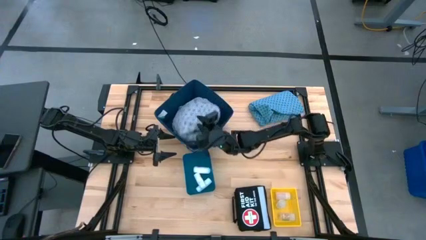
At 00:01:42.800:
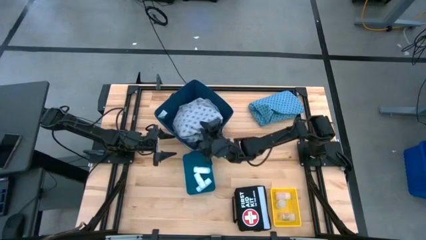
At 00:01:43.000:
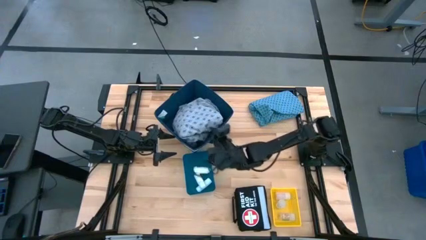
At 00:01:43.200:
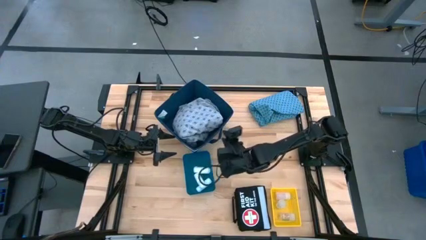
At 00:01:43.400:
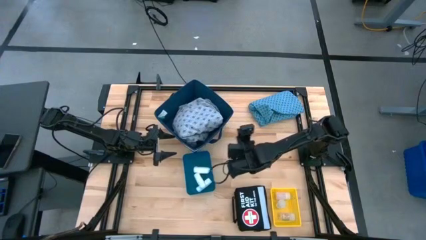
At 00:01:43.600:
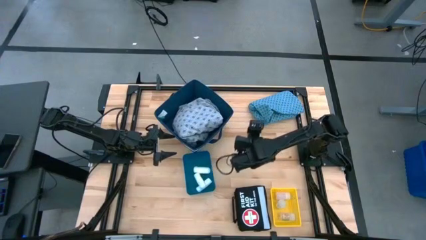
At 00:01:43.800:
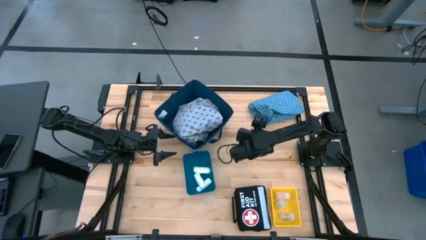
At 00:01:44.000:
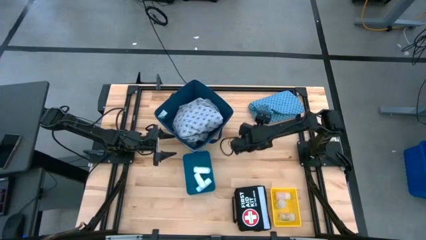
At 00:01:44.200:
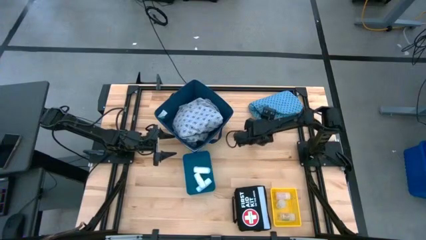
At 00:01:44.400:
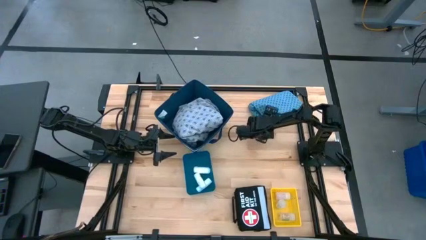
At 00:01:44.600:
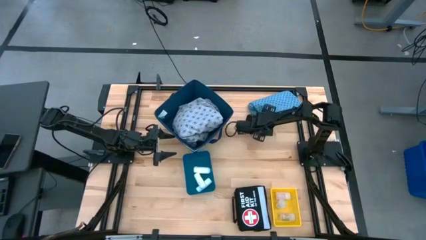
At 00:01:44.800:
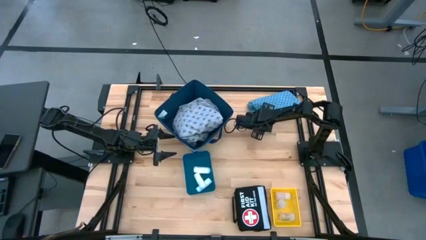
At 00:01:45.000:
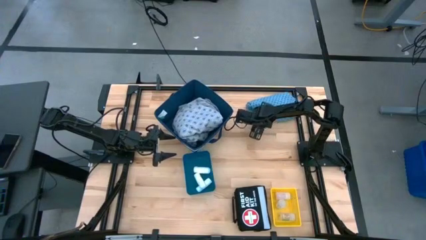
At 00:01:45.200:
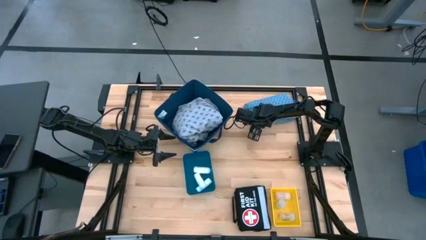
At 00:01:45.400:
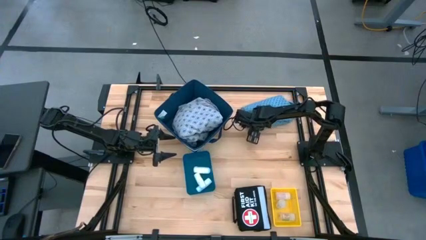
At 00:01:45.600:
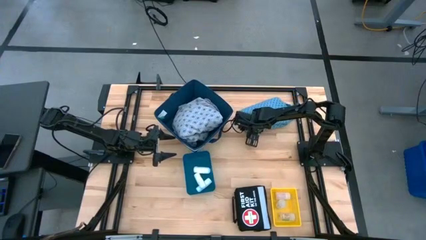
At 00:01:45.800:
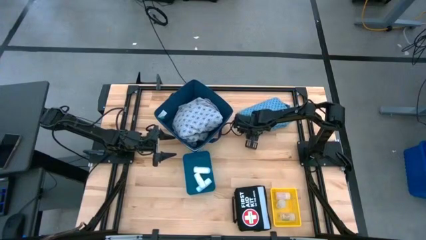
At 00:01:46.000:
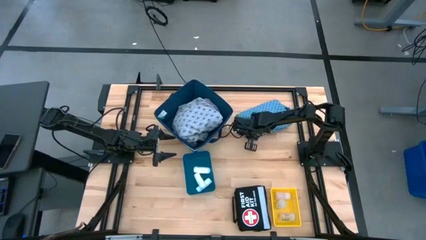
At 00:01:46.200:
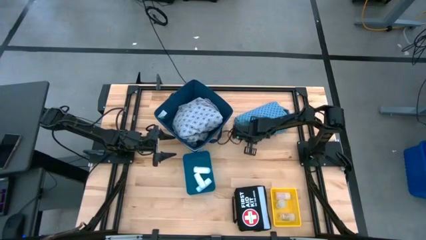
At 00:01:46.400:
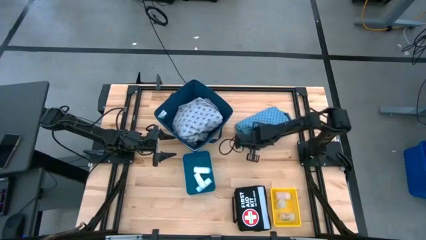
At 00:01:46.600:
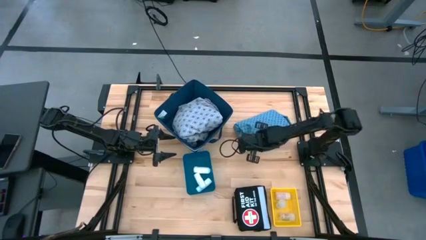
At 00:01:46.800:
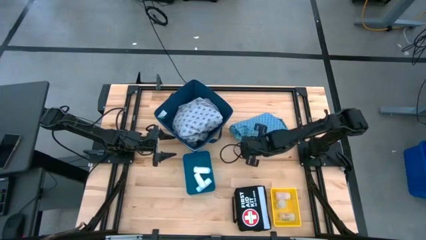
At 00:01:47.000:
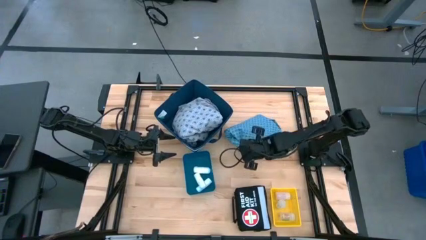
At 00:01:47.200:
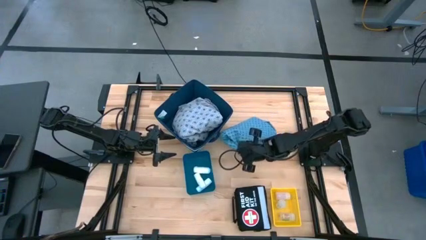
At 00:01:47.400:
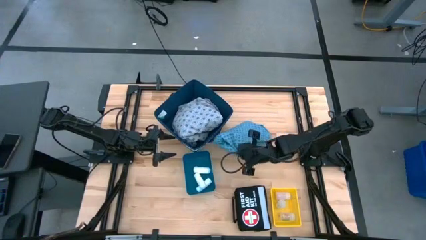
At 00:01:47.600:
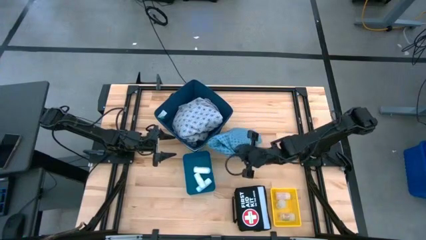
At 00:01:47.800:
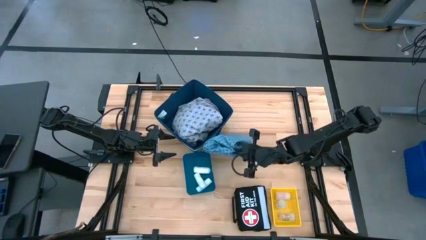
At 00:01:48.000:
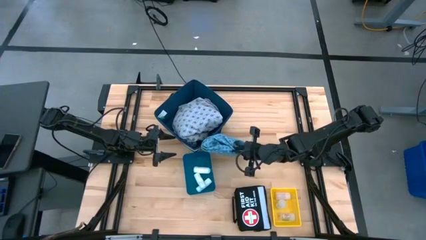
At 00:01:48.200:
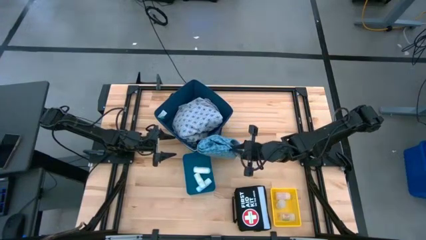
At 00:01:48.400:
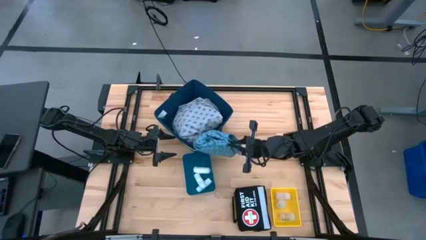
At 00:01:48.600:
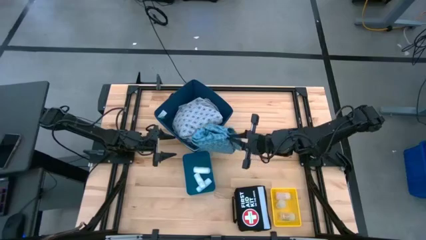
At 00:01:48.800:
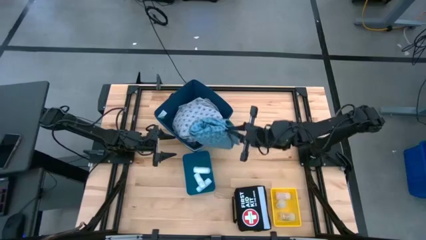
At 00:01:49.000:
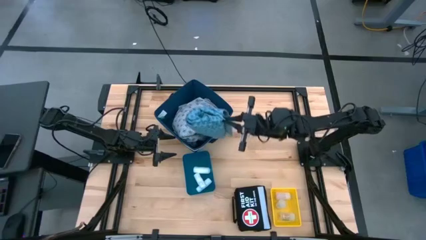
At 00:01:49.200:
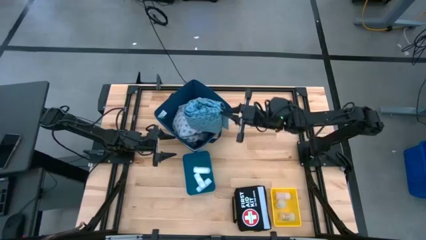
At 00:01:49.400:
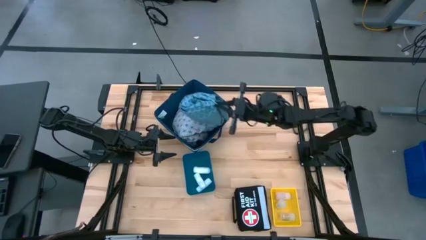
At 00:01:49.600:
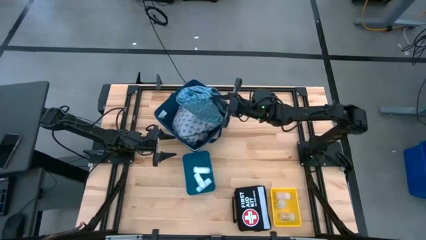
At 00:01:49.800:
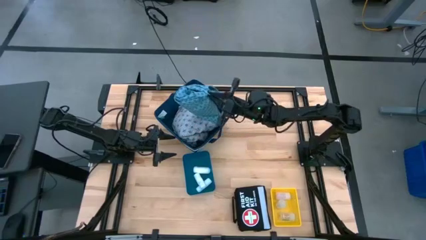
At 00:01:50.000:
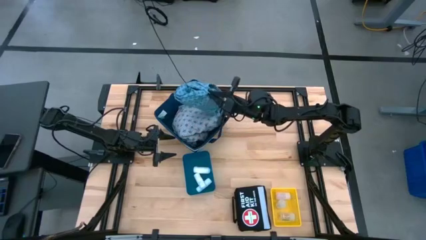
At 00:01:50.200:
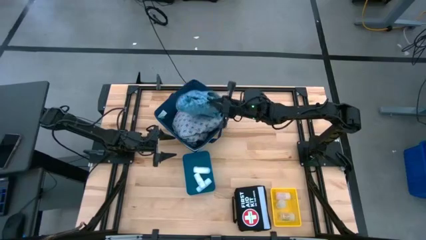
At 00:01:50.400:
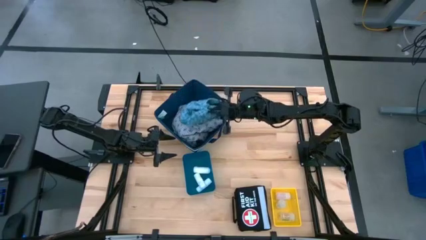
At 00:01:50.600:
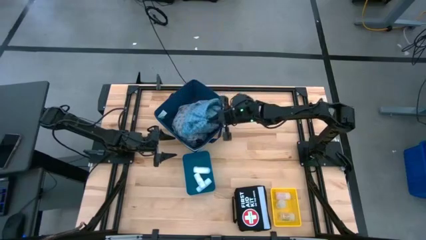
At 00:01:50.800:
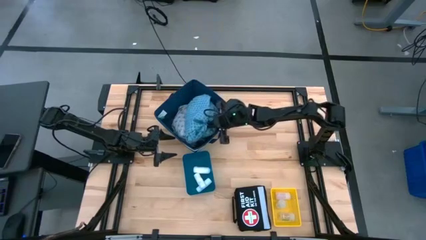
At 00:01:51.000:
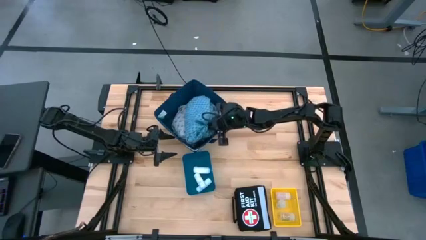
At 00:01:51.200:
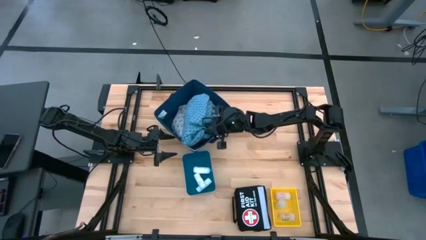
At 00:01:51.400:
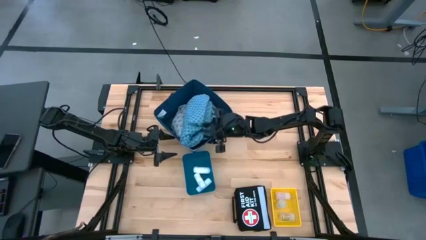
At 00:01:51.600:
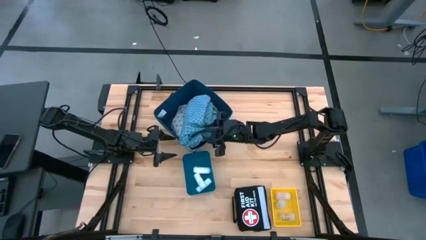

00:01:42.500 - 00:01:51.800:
Task: Pick & place medical supplies in basket/bin
Put the blue gown in the blue bin
